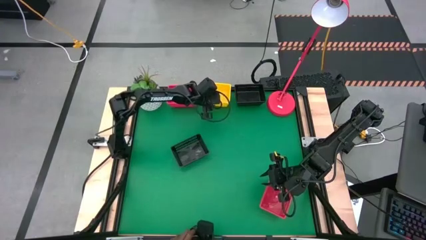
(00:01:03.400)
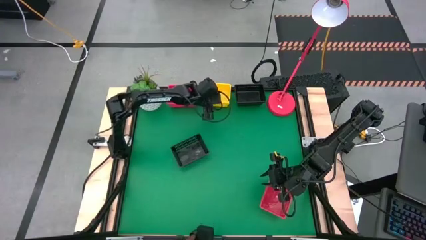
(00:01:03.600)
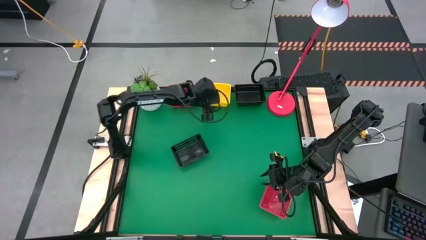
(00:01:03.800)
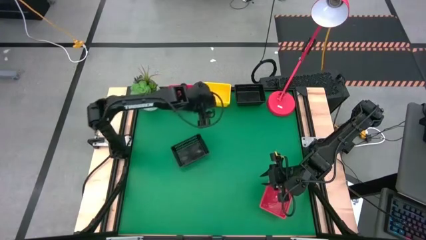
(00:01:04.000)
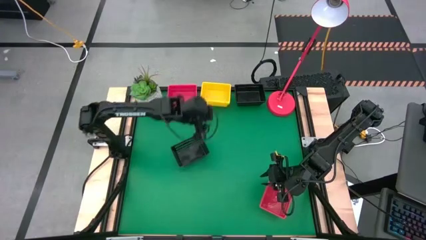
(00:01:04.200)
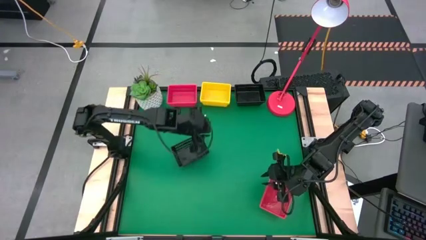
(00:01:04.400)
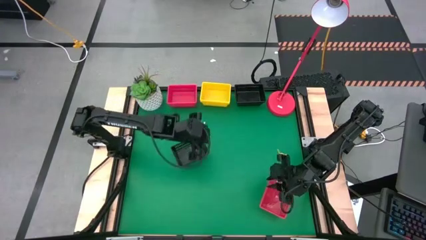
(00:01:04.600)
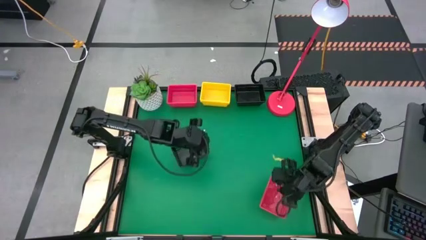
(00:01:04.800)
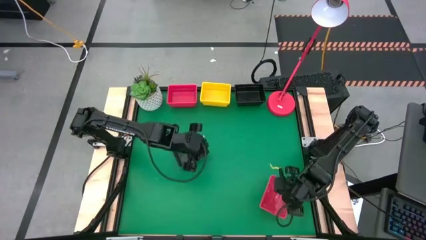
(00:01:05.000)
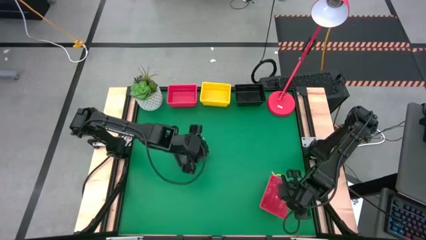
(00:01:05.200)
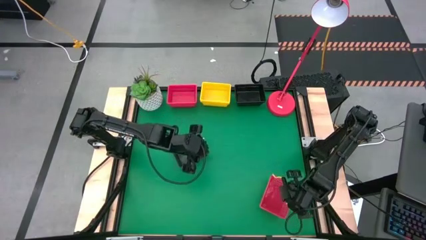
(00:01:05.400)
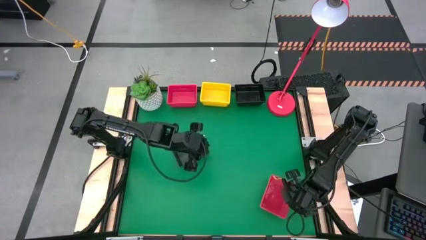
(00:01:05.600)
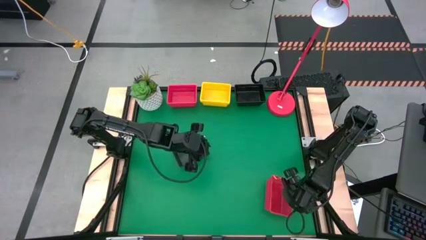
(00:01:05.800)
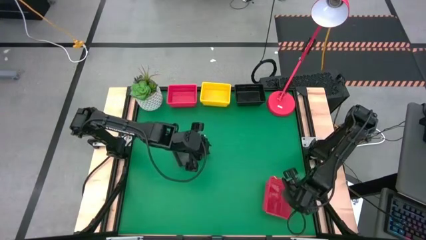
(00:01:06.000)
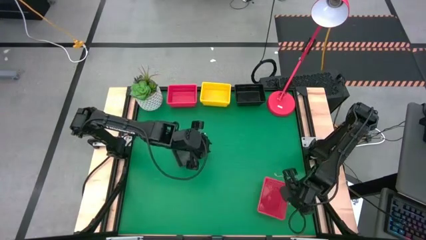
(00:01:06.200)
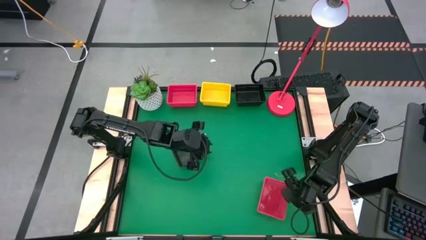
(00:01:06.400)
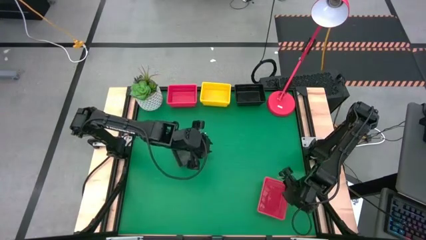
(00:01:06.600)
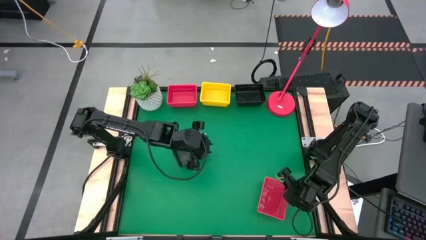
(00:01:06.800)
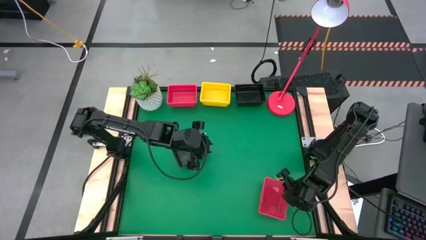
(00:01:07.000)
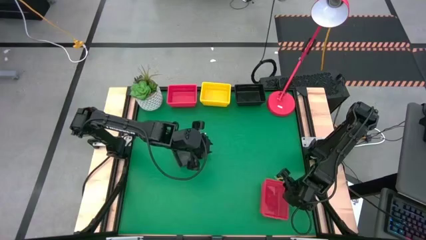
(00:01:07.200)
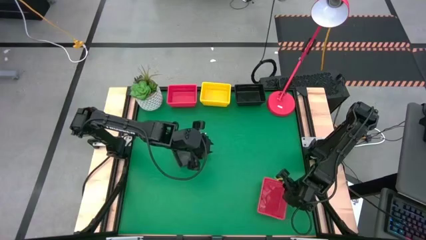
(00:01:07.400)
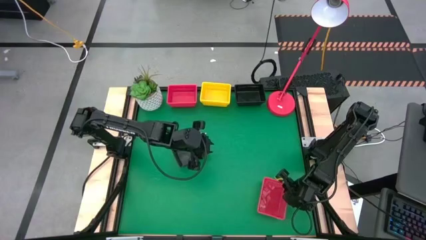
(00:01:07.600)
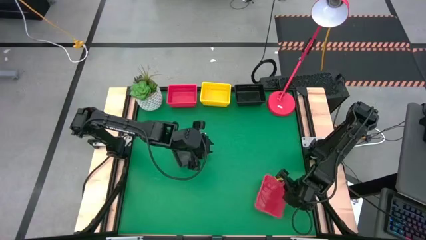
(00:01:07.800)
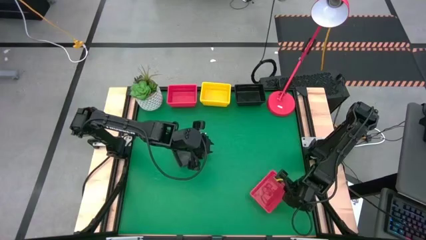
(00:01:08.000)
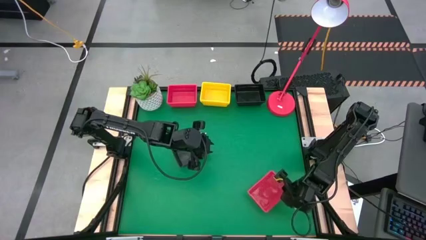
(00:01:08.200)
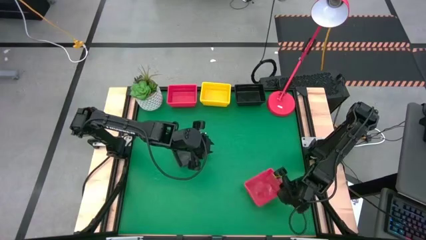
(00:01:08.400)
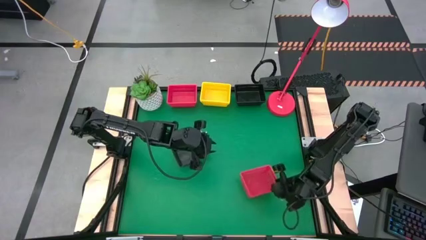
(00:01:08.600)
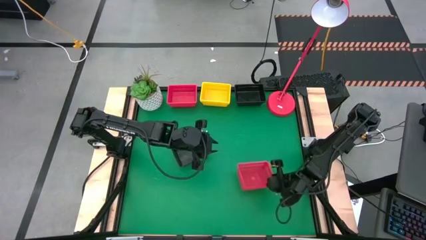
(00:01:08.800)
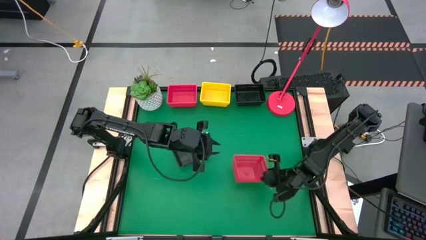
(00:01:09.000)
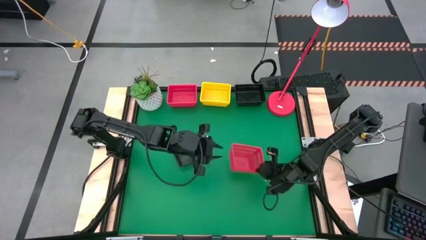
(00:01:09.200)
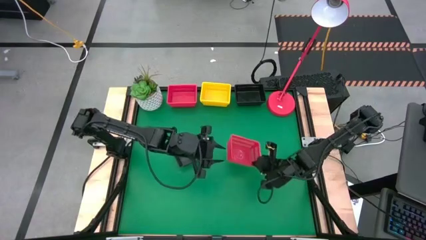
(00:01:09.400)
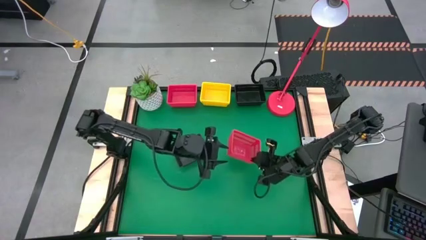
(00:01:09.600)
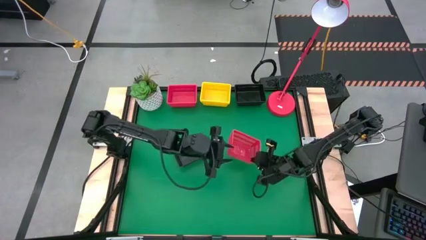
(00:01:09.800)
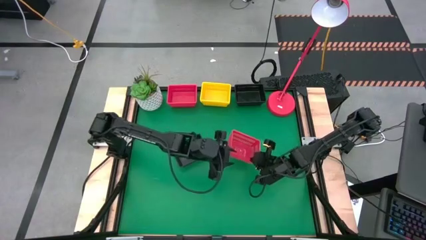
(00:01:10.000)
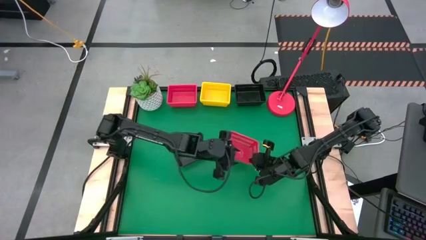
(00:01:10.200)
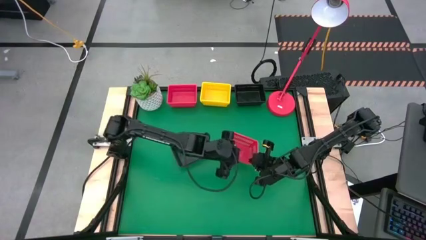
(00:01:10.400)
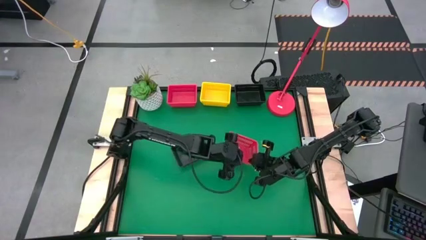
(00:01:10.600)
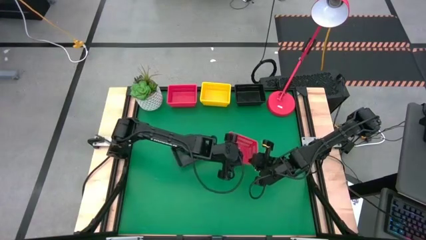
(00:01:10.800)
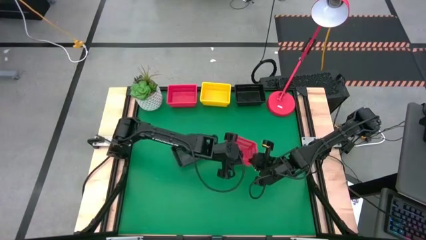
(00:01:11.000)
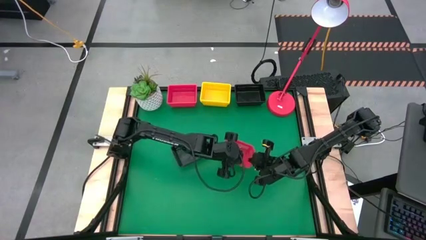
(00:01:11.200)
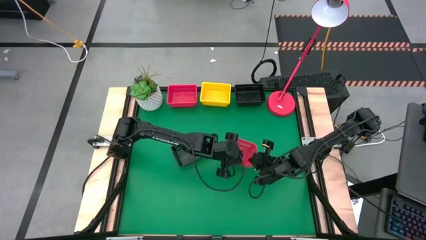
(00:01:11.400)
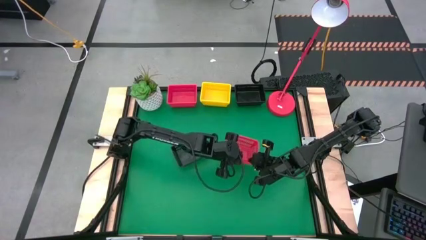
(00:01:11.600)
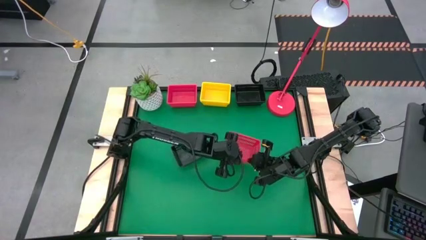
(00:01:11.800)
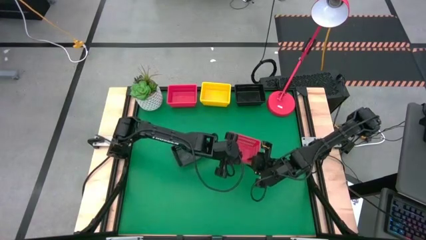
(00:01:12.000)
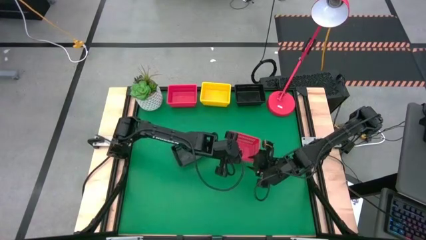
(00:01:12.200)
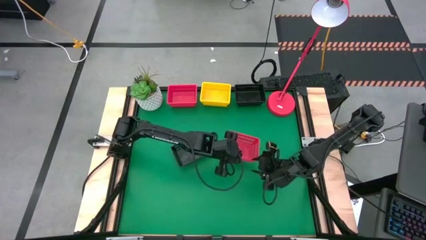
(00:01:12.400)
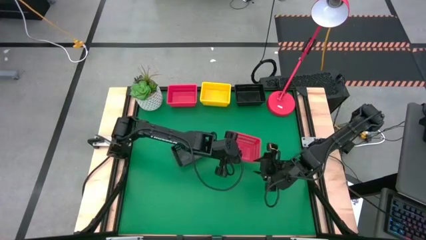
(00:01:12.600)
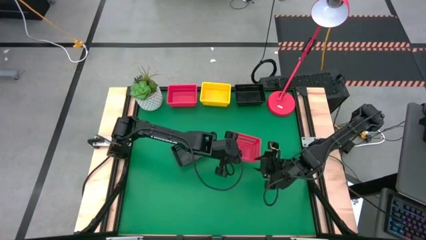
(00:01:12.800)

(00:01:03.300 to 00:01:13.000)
Stack the red basket on the stacked red baskets

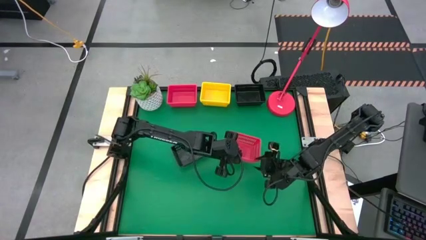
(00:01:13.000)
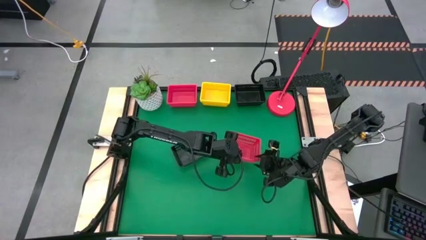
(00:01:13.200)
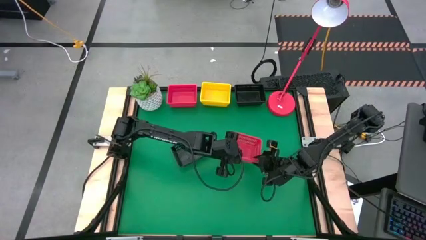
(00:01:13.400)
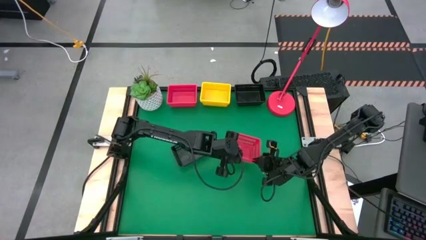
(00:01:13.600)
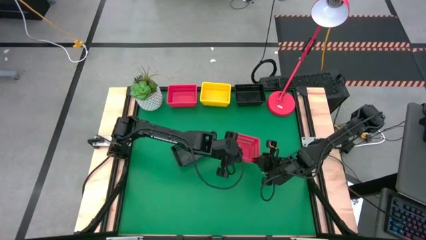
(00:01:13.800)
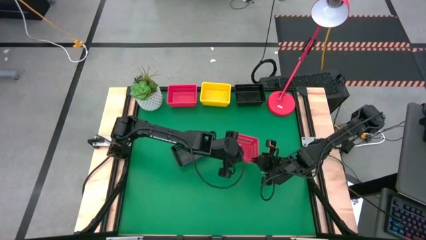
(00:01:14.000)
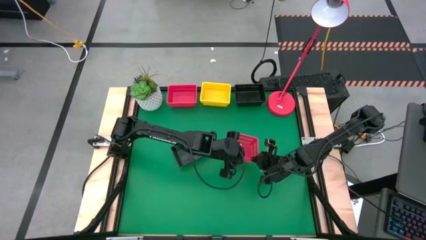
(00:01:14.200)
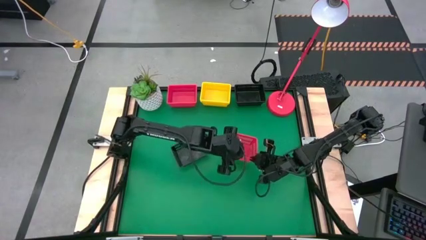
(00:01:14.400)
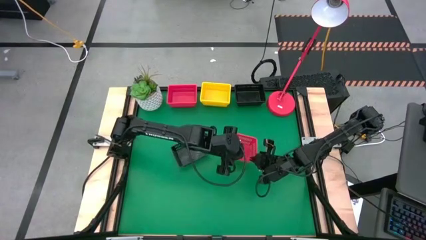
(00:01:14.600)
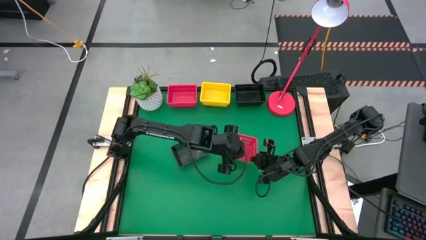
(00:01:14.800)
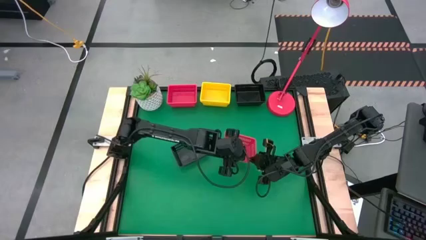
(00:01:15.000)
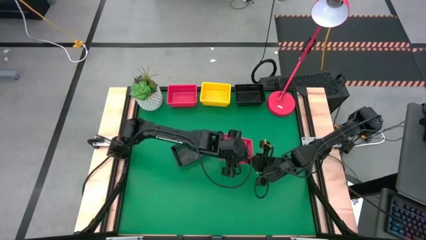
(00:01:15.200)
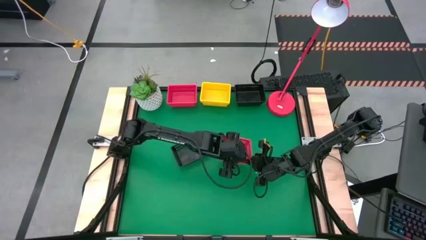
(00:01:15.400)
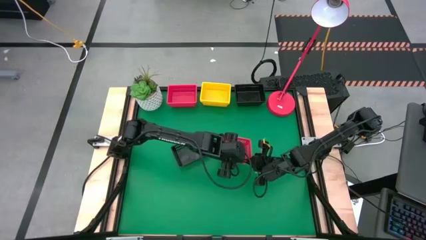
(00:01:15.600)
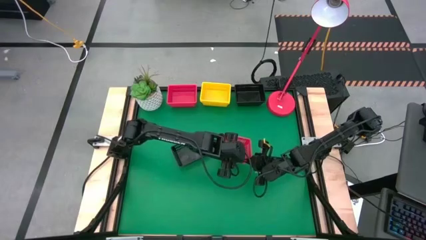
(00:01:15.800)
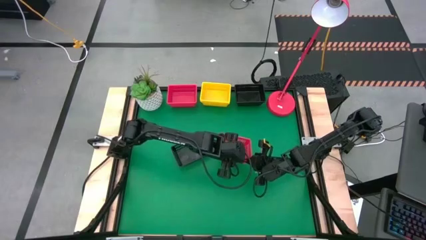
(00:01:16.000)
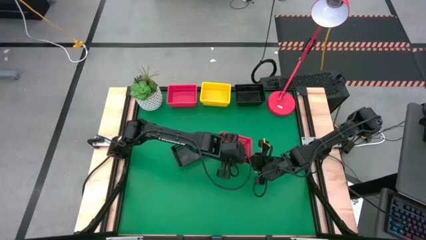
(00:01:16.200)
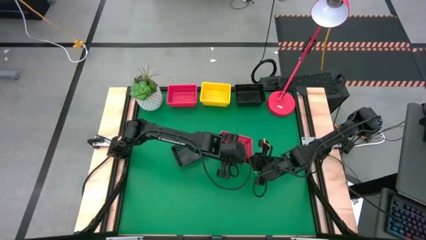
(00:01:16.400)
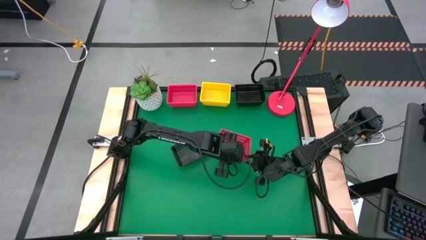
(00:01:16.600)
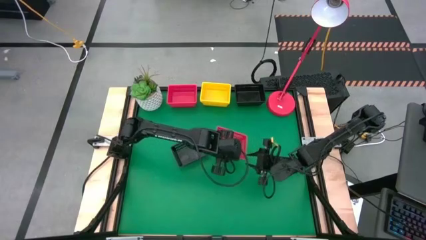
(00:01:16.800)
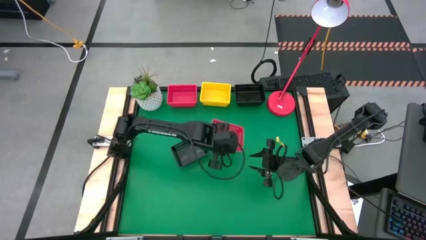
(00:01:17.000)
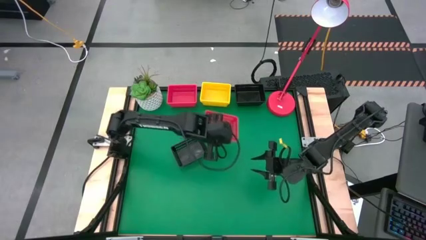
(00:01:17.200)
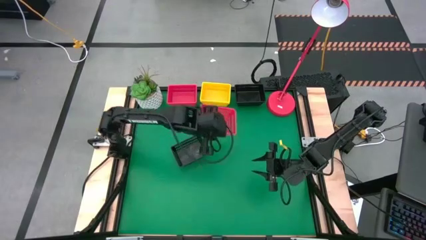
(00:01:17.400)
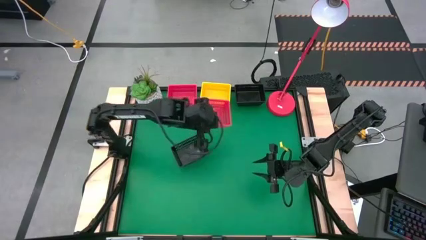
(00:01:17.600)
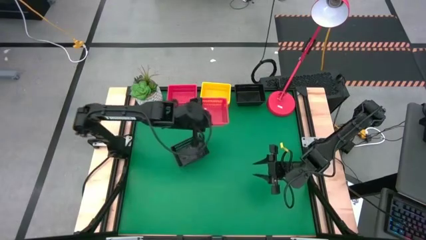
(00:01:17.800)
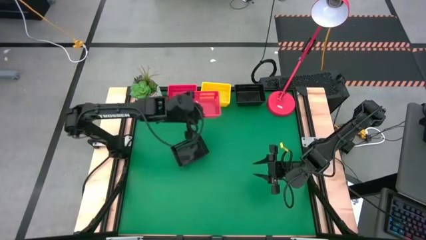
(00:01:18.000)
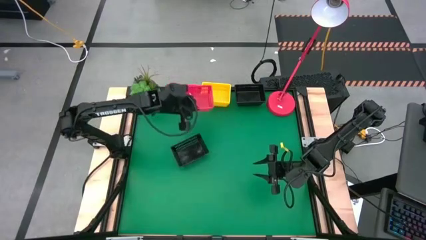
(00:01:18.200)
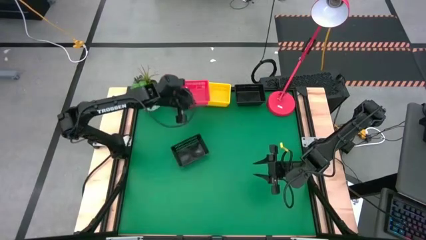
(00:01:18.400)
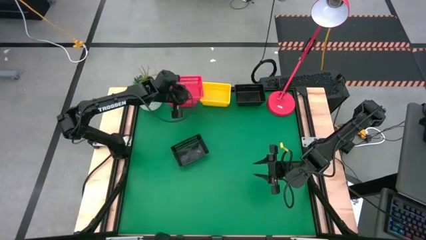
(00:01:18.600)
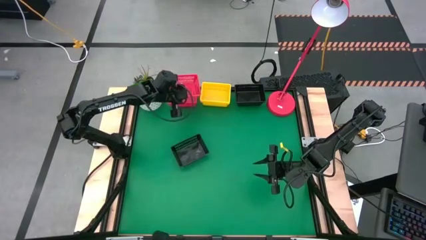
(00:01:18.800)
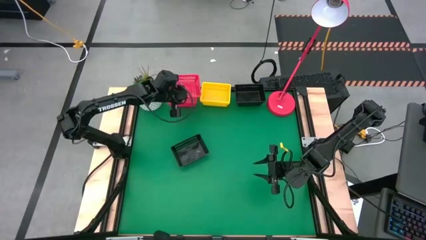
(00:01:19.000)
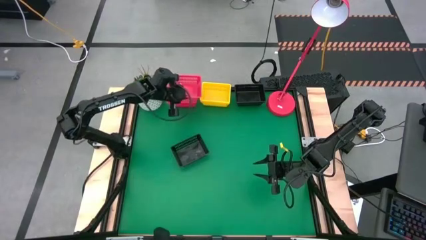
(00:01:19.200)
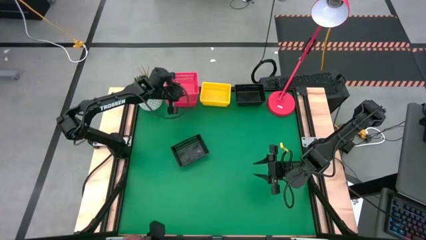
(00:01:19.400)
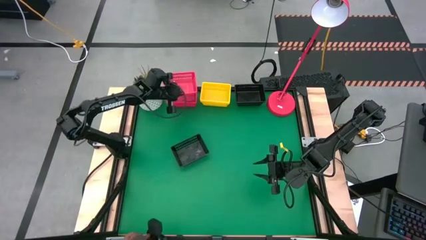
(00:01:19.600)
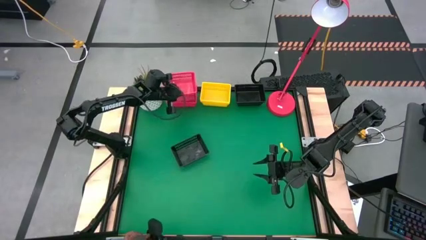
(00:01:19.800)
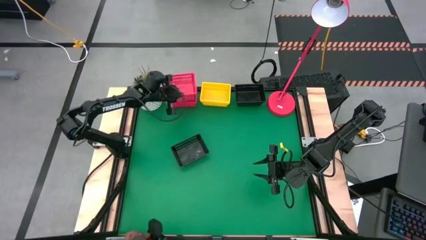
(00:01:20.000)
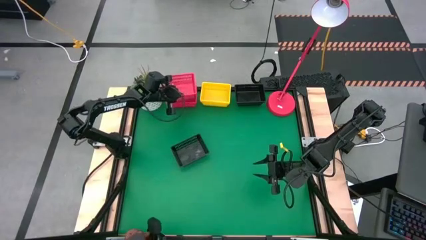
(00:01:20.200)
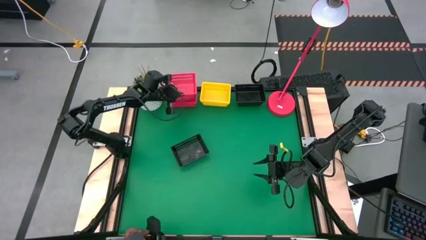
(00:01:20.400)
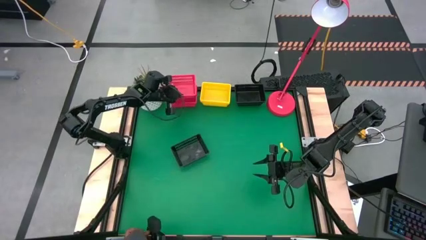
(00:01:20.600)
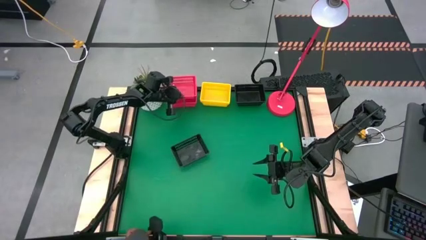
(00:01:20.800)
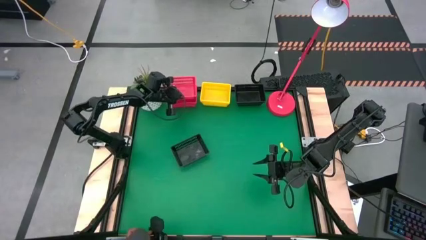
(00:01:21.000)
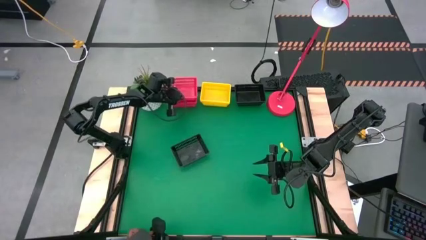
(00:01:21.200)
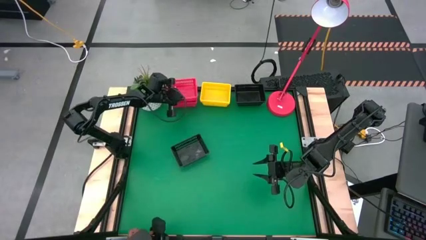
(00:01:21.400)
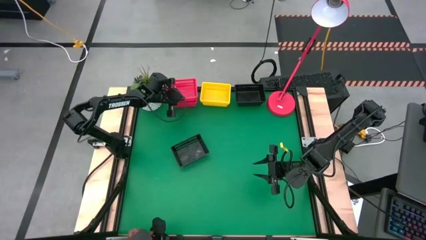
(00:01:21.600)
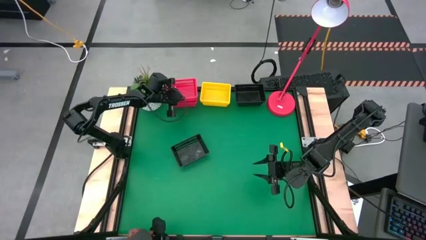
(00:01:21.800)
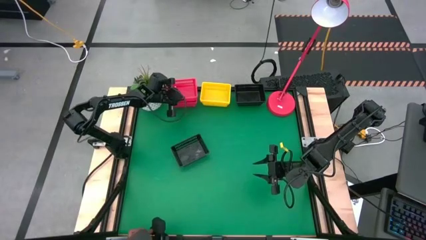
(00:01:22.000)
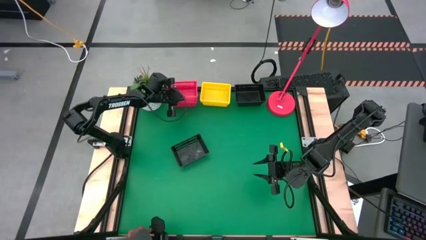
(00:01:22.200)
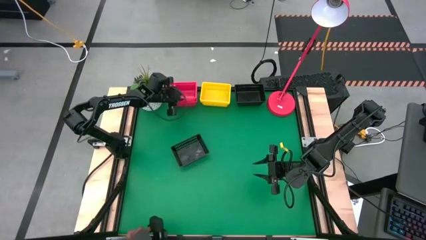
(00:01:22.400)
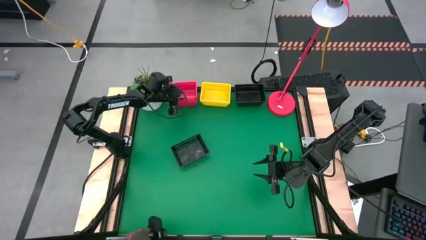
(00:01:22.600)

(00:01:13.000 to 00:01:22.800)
Stack the red basket on the stacked red baskets
